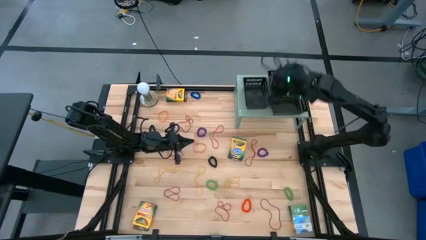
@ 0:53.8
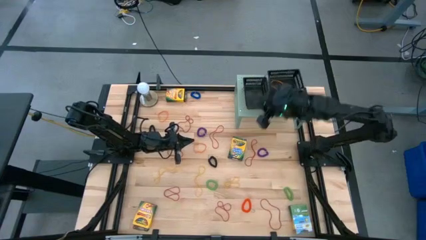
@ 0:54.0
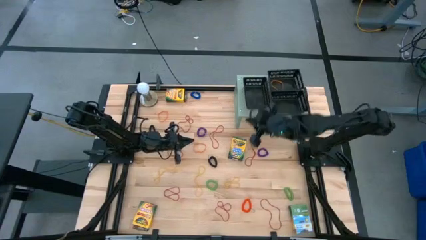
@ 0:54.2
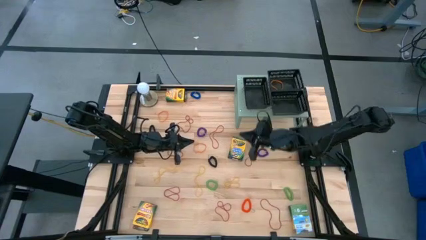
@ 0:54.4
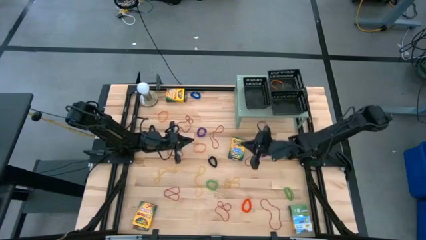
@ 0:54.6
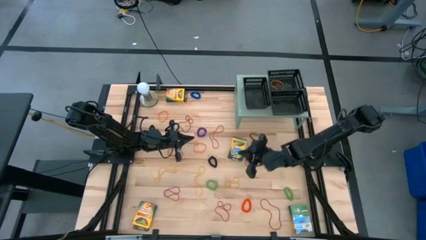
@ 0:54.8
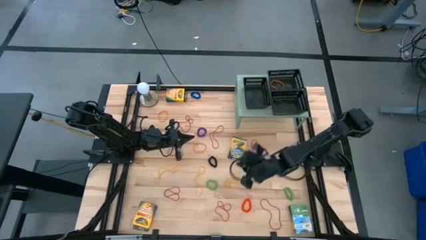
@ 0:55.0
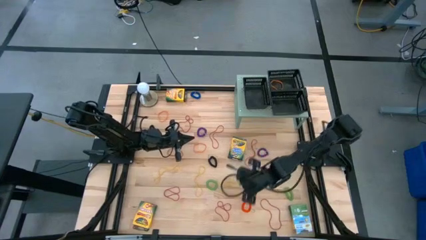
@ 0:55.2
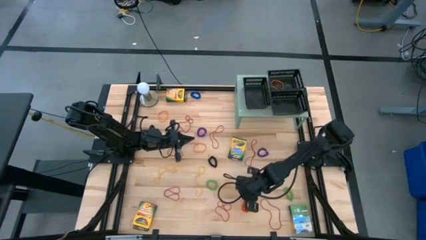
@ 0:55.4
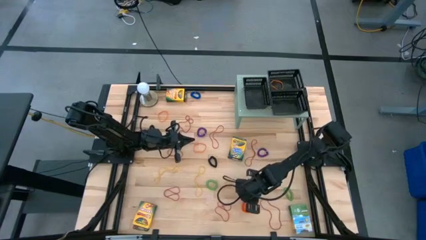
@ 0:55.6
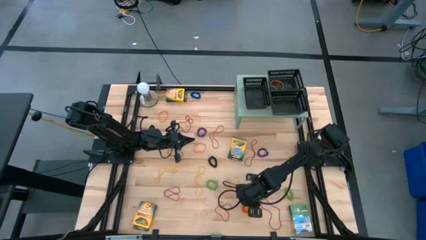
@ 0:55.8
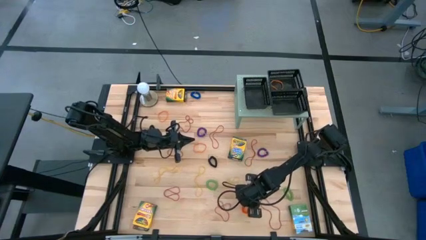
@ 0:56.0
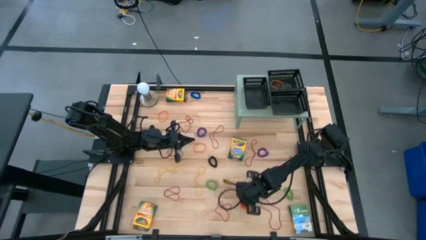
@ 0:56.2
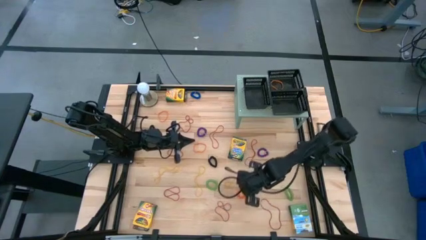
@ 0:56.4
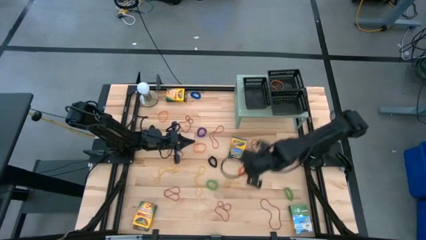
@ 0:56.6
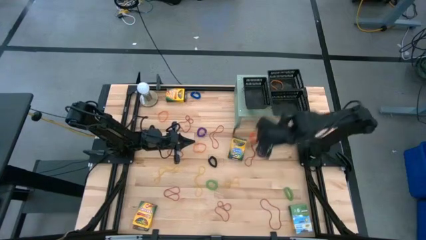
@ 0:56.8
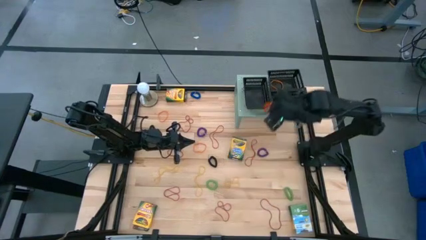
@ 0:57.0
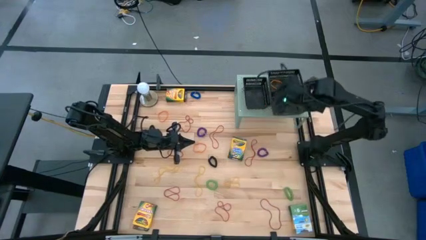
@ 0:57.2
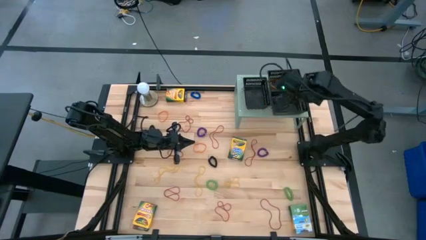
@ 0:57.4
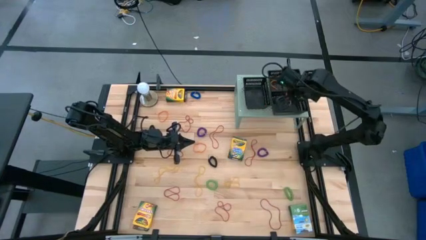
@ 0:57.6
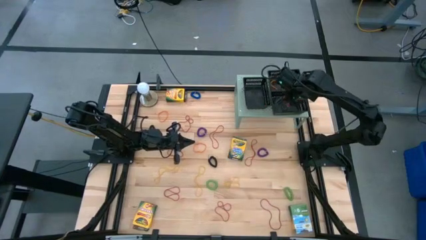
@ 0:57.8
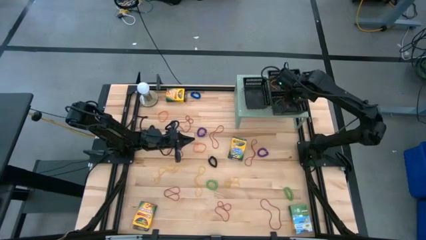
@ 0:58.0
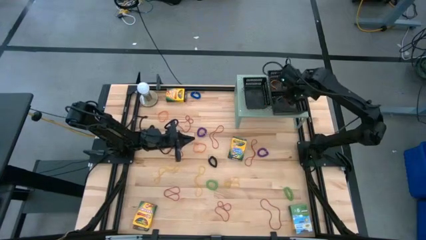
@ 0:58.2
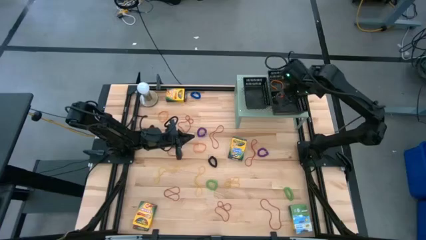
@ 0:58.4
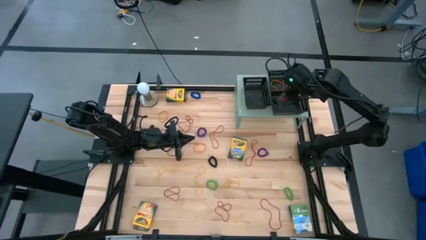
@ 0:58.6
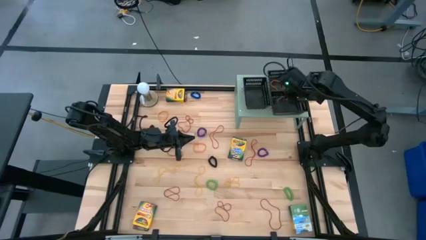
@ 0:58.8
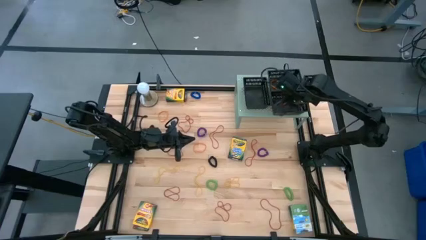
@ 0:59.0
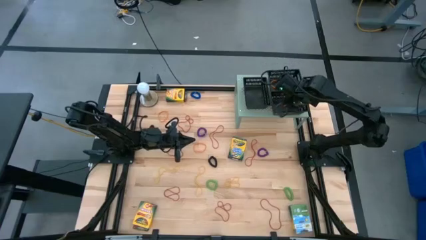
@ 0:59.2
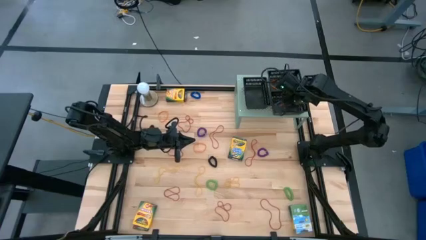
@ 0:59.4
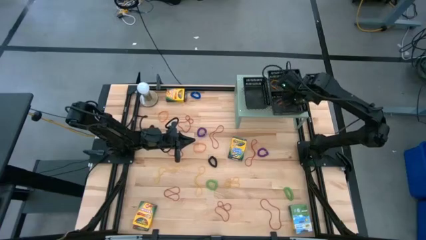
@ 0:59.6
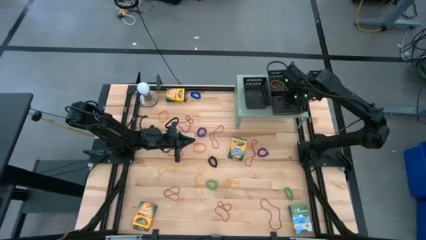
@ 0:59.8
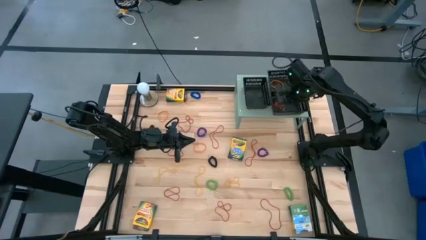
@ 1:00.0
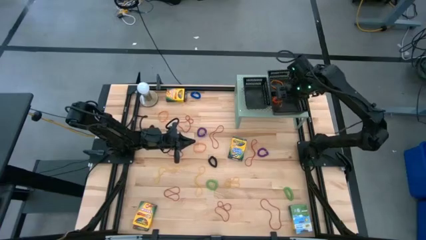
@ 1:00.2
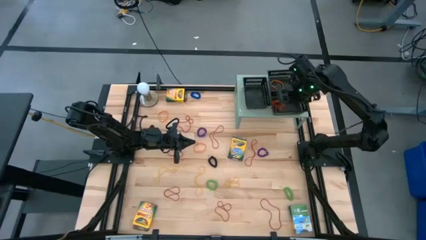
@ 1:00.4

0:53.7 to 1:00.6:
Task: Pick & Place Office Desk Supplies
Put the orange spring keychain into the bottom right black bin on the shelf

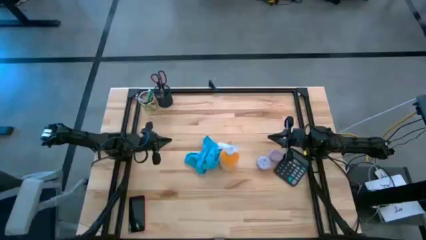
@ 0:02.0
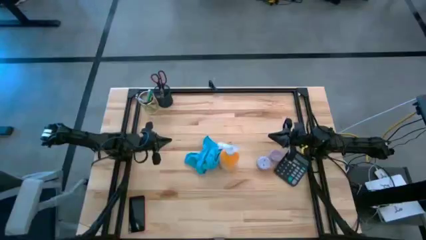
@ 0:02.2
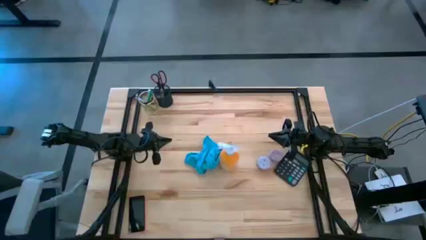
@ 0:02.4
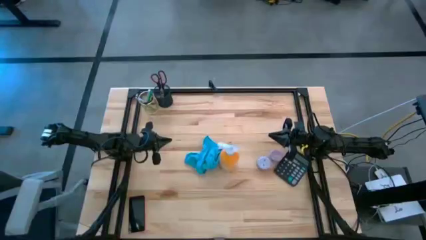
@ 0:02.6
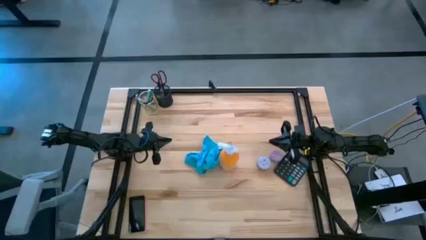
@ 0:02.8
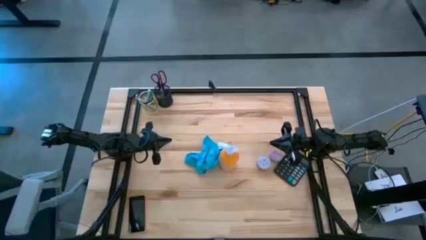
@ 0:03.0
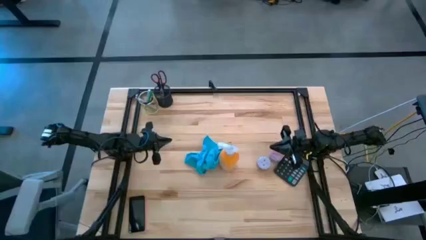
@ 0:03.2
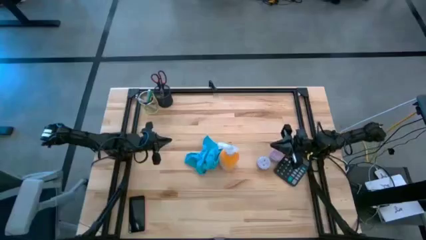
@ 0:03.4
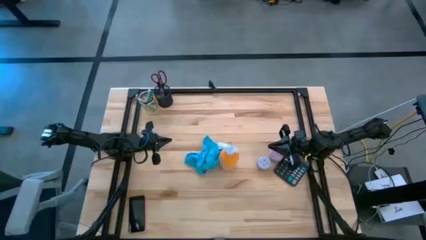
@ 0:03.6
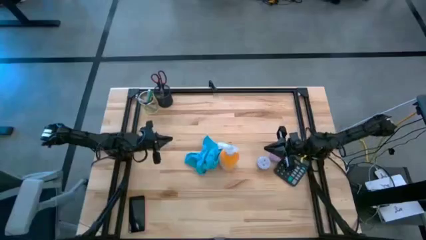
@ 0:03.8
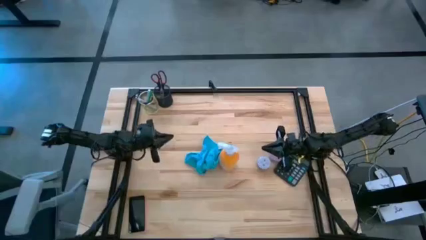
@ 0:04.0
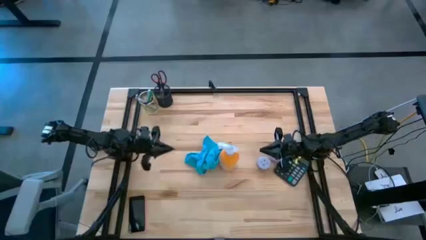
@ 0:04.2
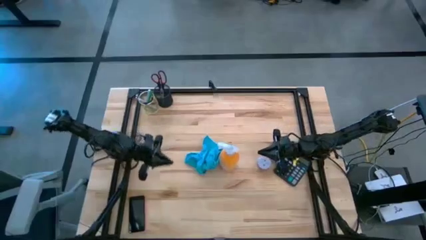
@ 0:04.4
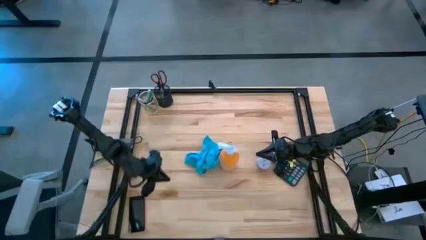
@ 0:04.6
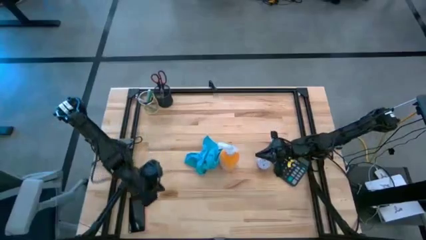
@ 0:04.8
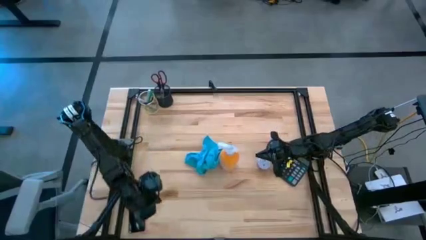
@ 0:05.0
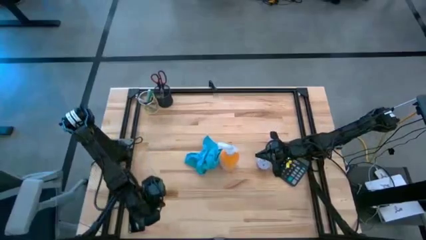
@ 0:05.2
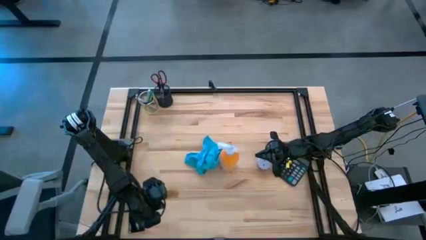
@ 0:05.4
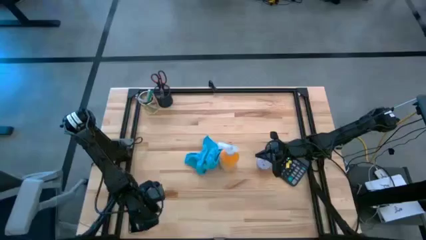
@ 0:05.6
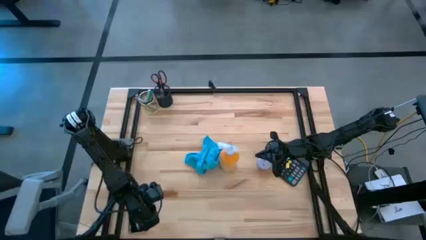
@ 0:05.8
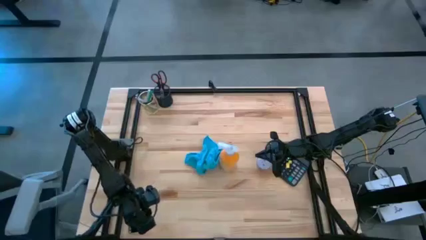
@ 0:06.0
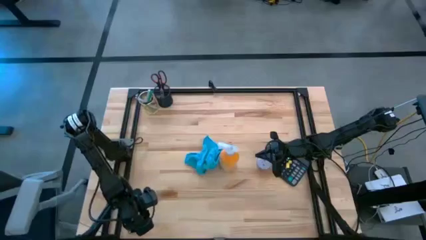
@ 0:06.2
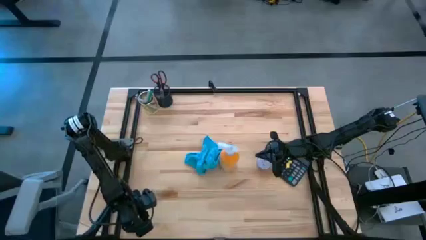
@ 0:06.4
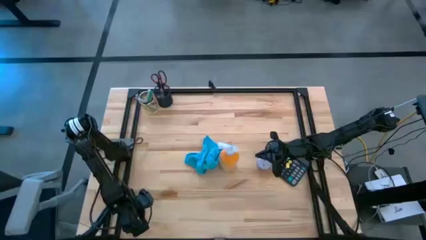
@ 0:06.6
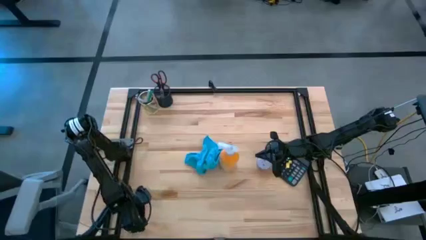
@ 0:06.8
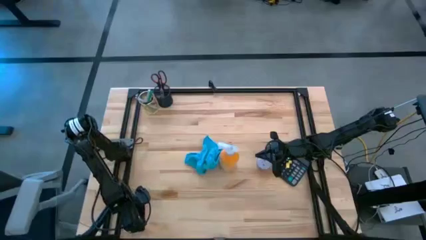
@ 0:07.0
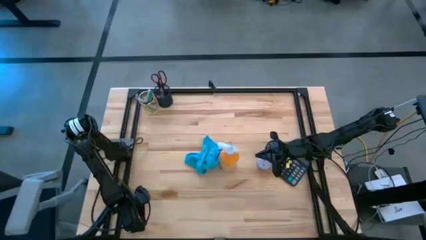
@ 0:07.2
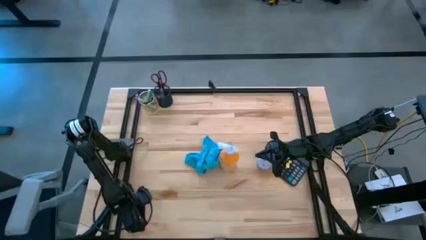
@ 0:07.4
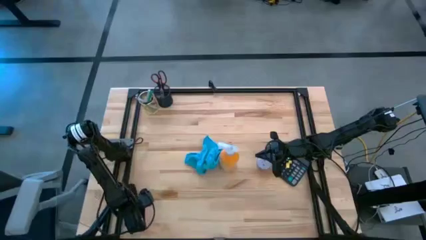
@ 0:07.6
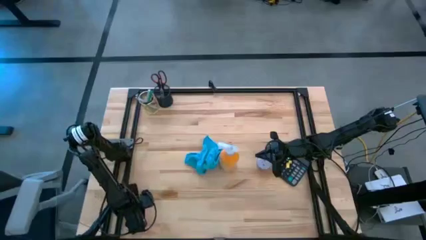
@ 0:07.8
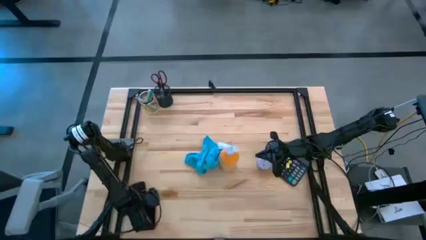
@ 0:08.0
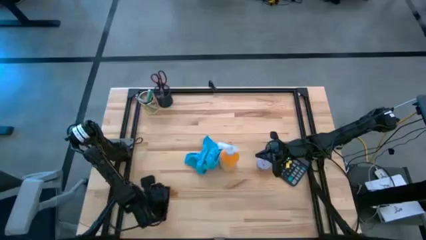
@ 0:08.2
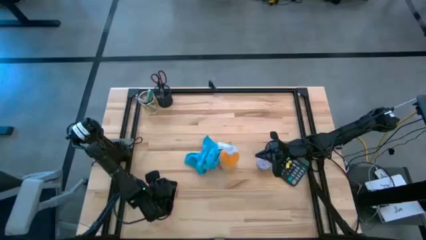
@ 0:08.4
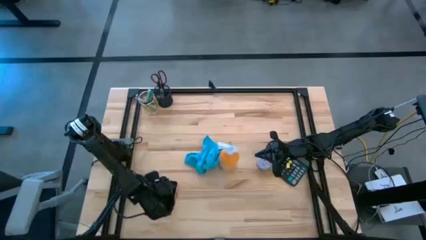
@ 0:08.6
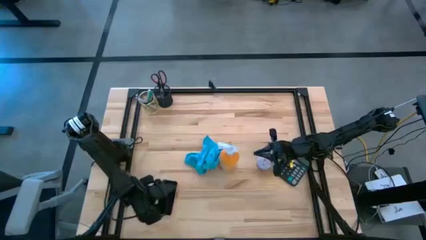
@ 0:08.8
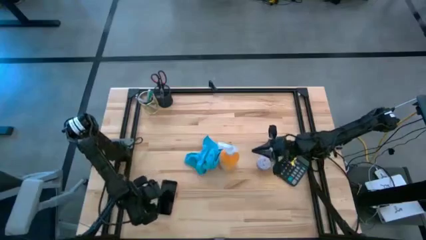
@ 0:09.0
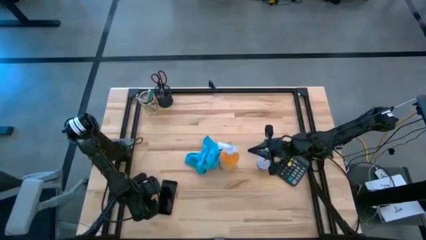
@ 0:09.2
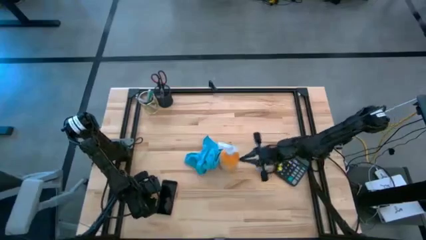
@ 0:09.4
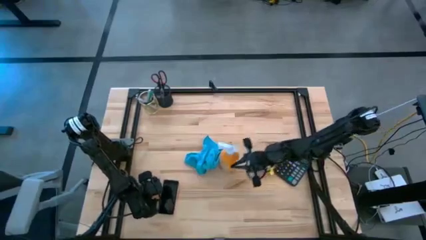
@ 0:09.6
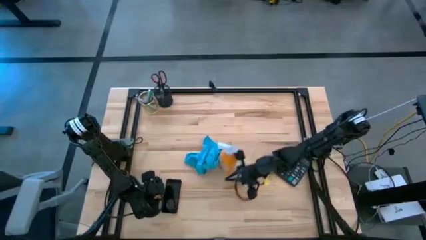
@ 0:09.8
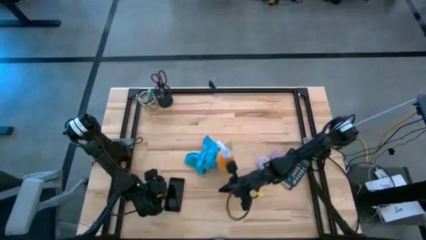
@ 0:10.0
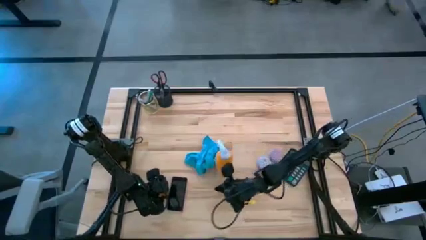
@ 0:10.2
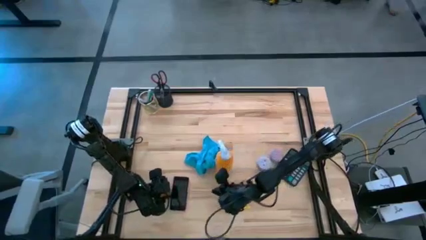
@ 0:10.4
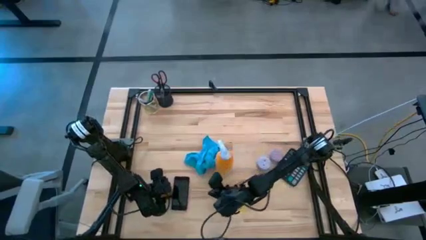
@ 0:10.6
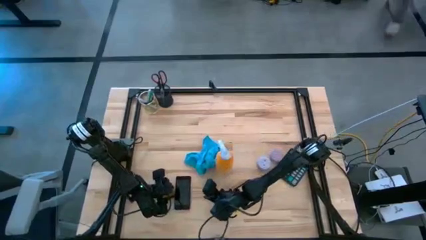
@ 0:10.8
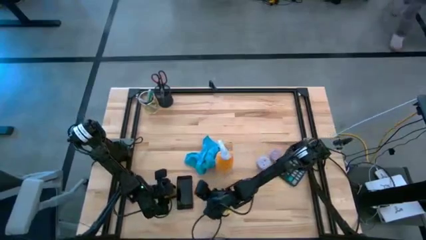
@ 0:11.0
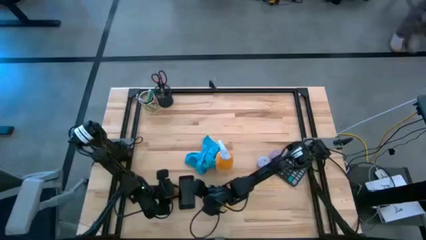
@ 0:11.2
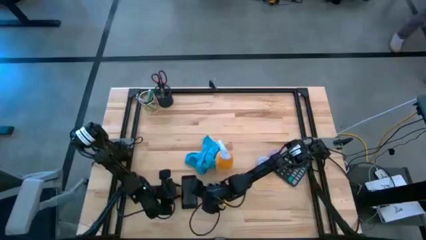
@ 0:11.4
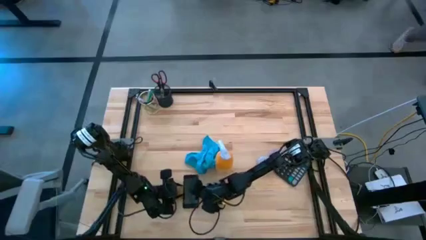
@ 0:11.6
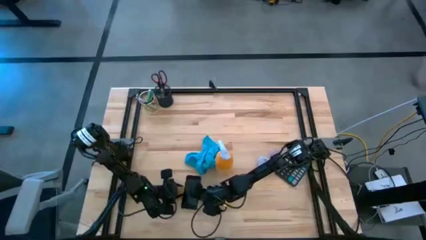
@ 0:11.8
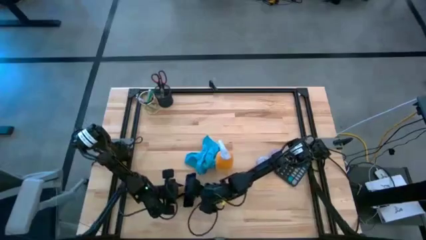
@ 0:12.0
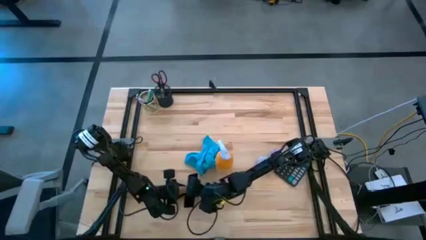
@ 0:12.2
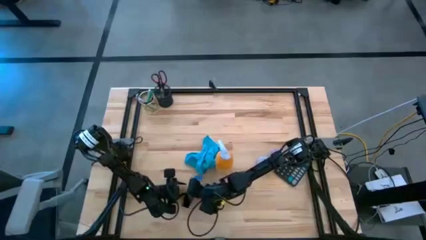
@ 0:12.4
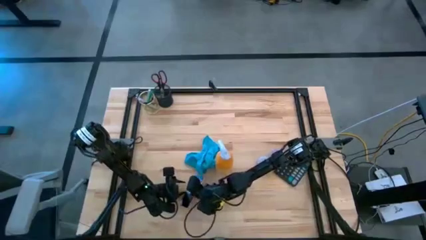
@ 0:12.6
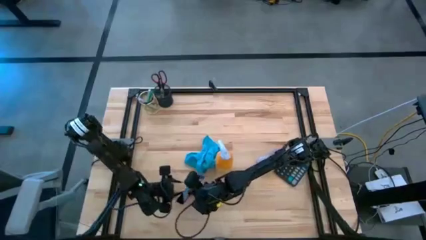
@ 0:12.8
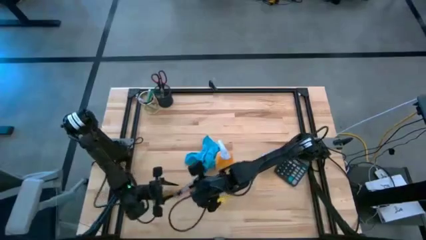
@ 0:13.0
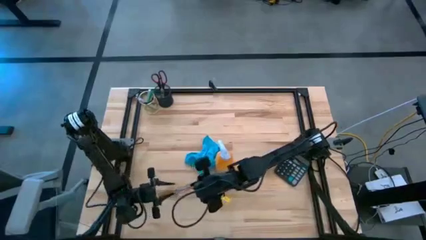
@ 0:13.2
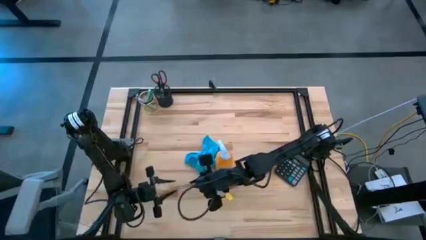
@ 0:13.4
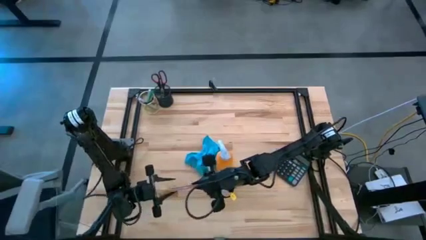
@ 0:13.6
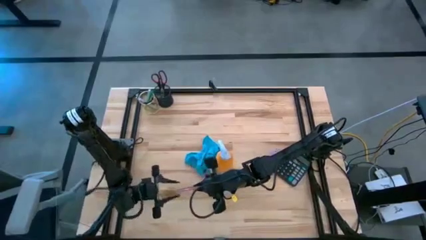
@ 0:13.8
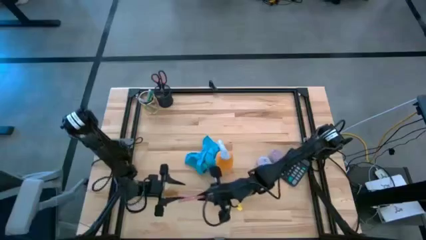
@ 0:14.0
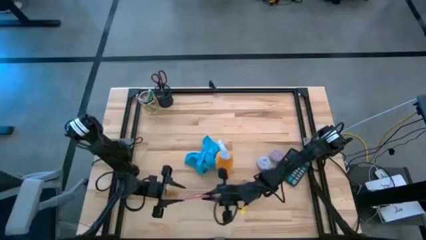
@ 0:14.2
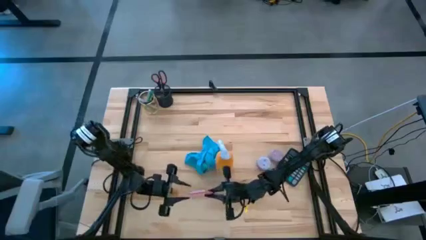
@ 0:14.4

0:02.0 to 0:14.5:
Task: Apply microfiber cloth
Spray the cellphone on the front and back using the spray bottle
